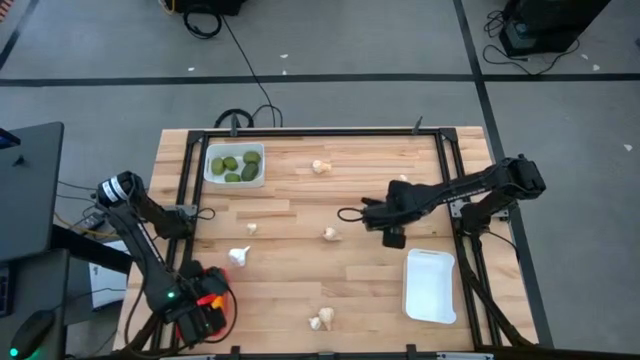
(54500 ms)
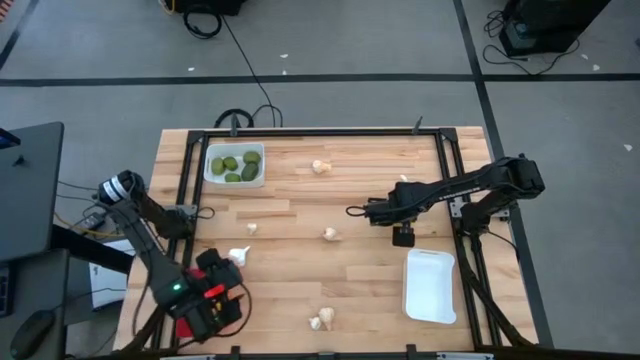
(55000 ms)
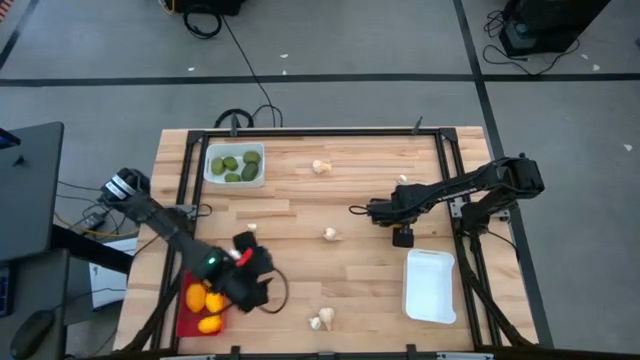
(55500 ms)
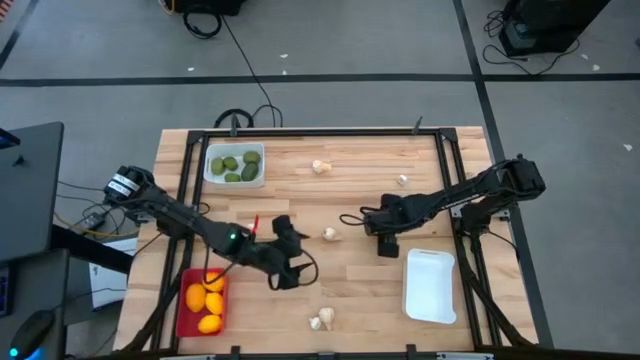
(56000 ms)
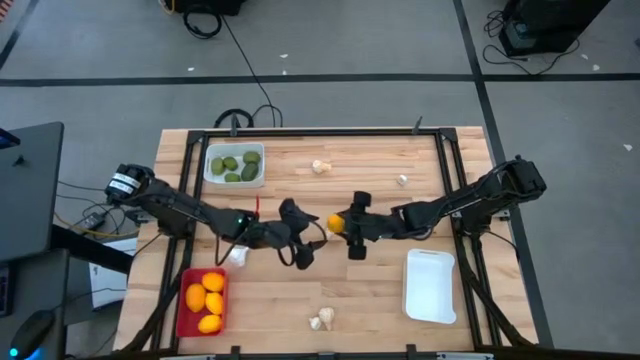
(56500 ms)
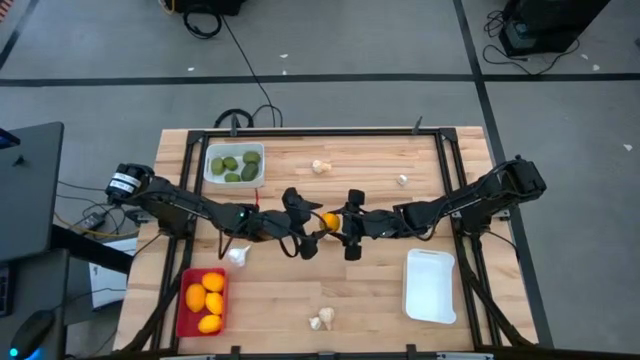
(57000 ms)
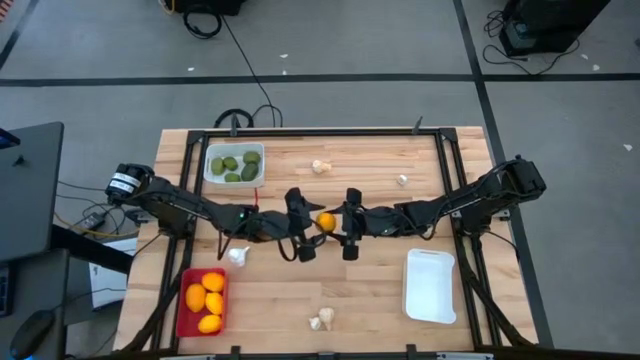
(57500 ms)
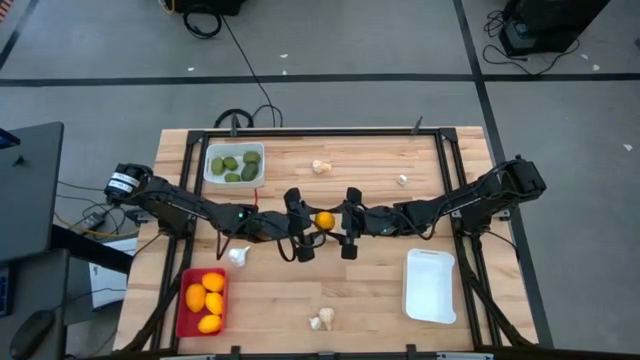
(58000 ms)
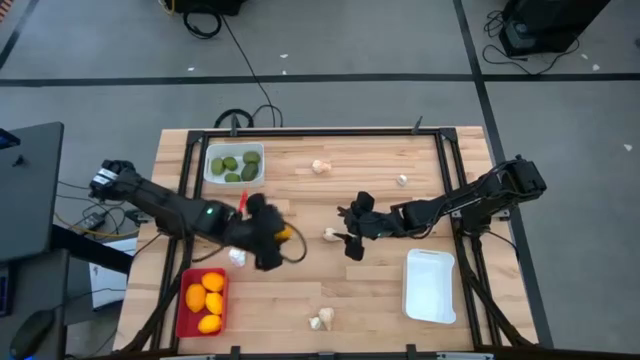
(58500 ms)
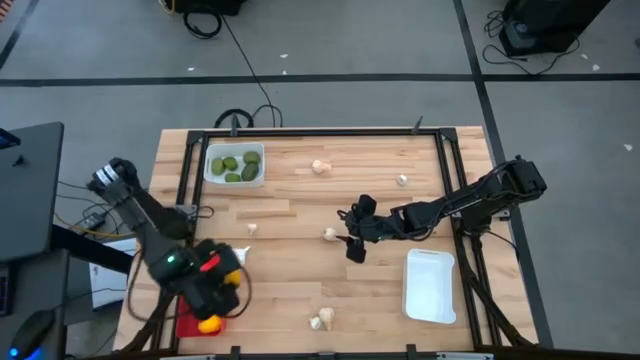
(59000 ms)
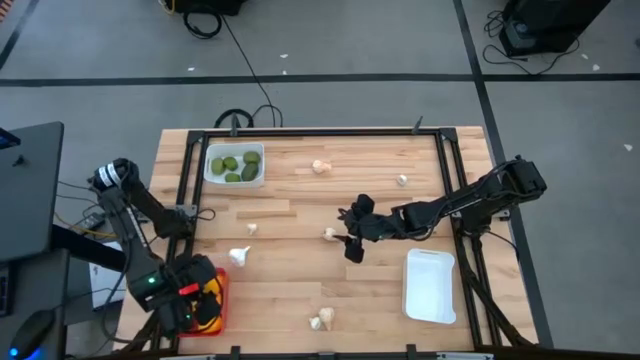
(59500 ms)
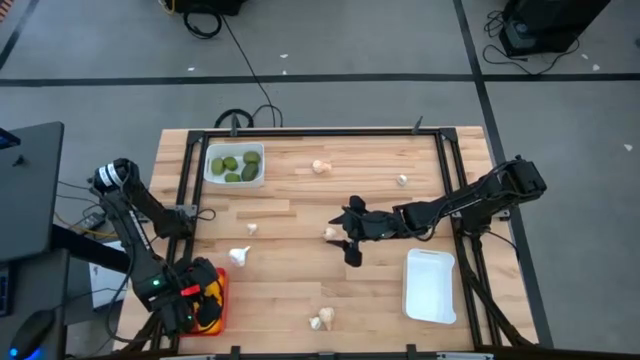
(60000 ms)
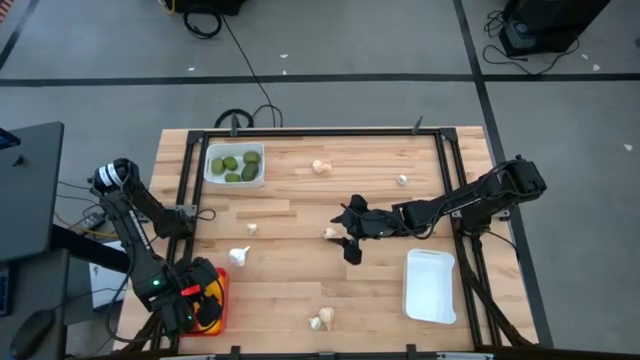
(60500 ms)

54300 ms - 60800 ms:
Task: Sort produce into baskets
Put the yellow lemon into the red bin

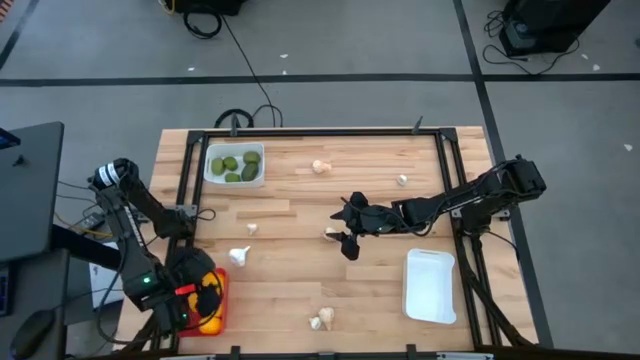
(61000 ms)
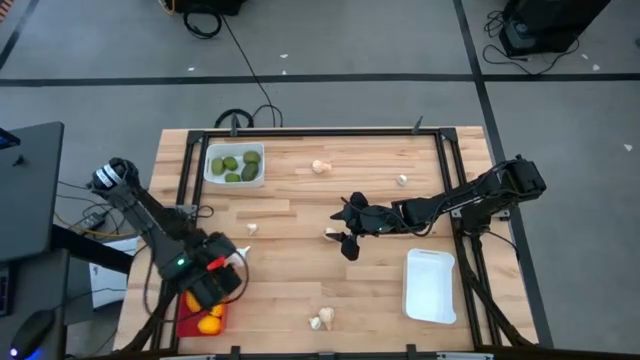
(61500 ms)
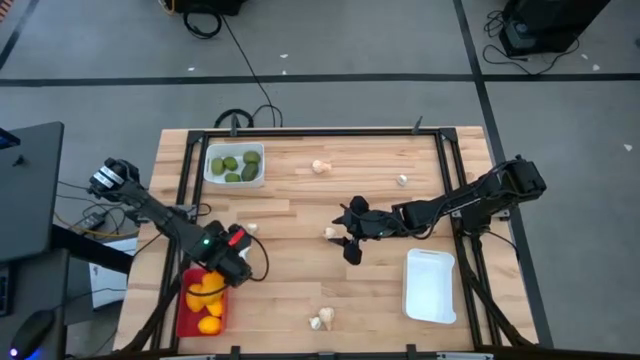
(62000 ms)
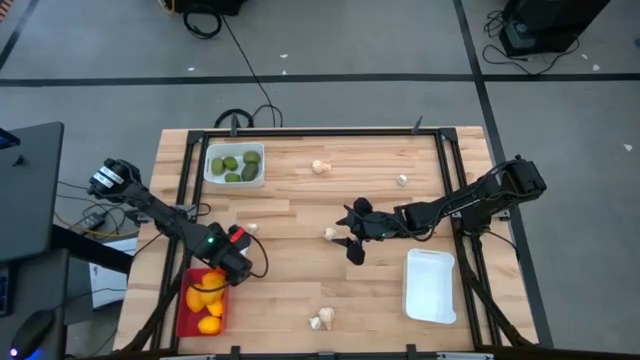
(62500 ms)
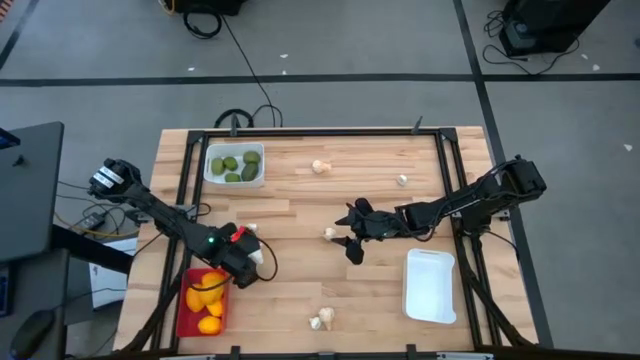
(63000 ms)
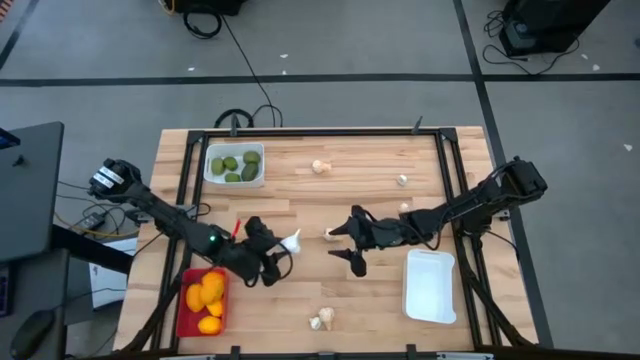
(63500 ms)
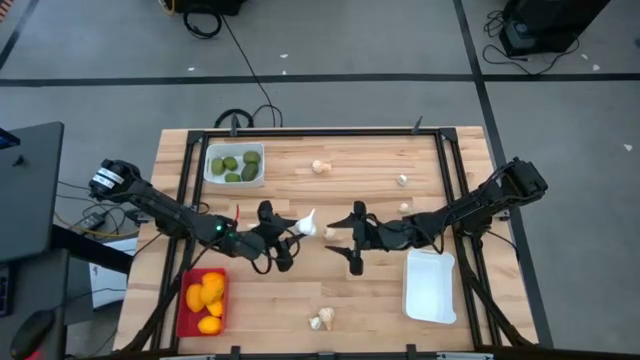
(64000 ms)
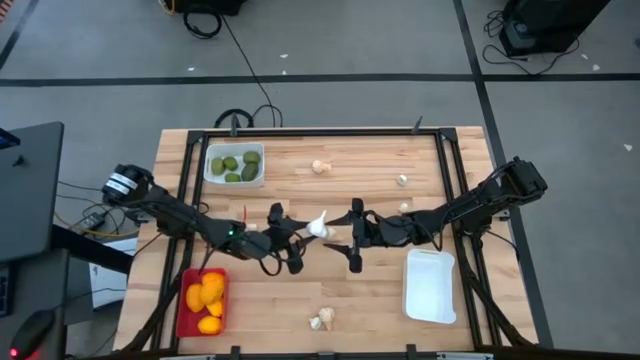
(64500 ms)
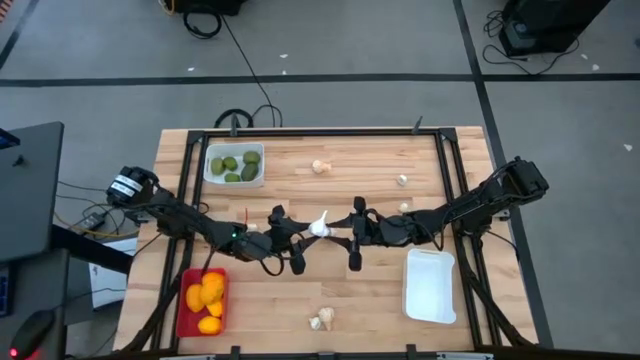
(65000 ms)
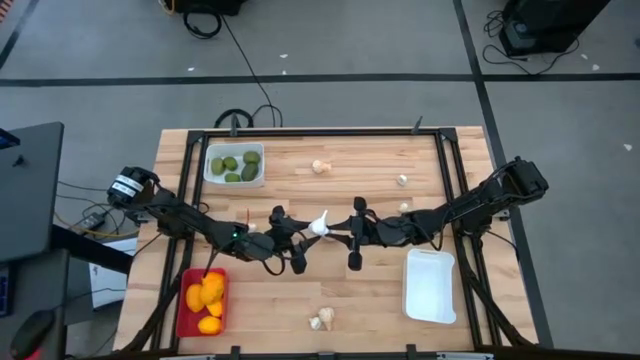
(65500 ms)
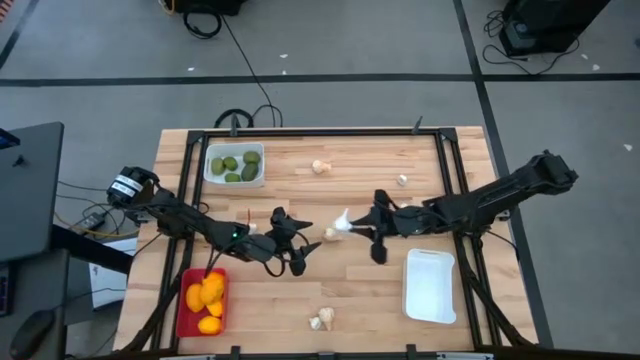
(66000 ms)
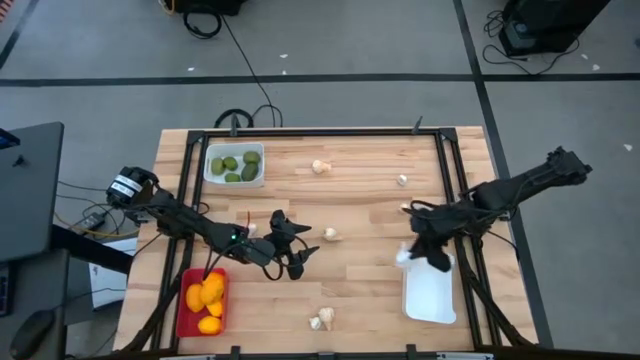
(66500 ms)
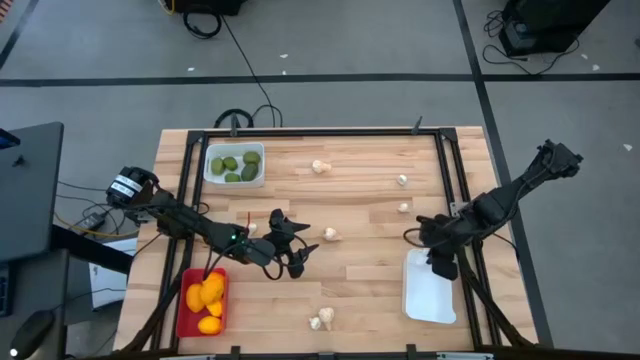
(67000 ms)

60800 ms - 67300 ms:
Put the left big white garlic into the bottom white bin

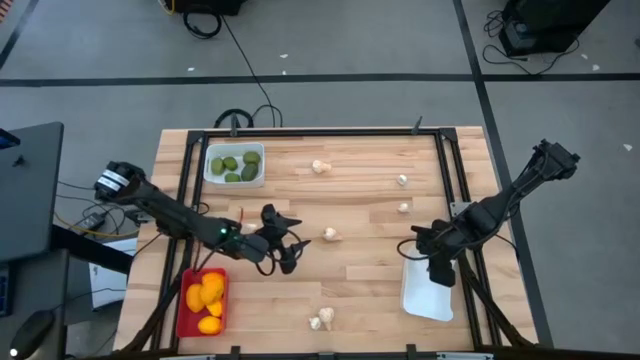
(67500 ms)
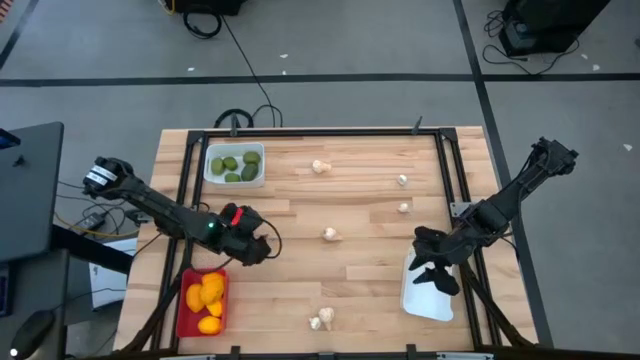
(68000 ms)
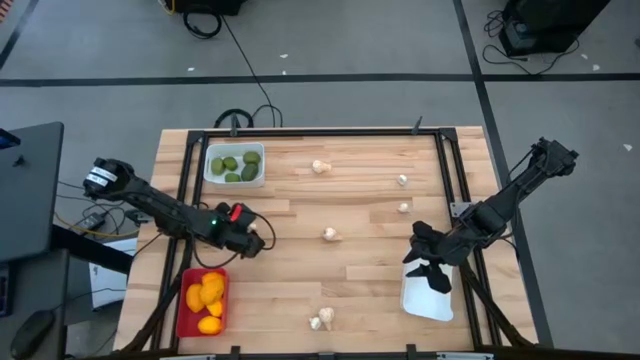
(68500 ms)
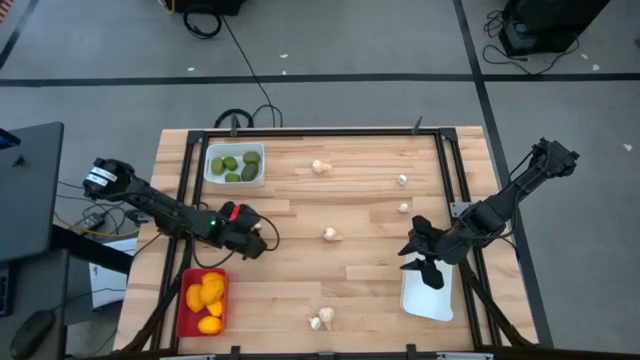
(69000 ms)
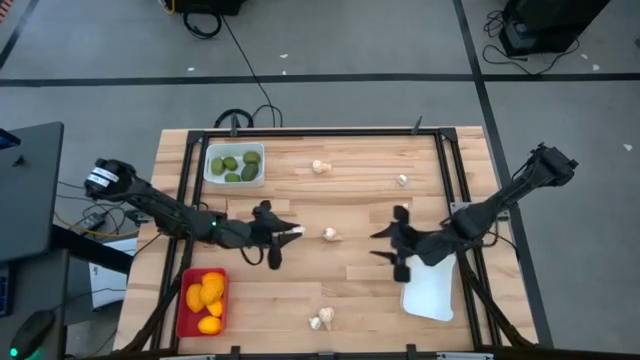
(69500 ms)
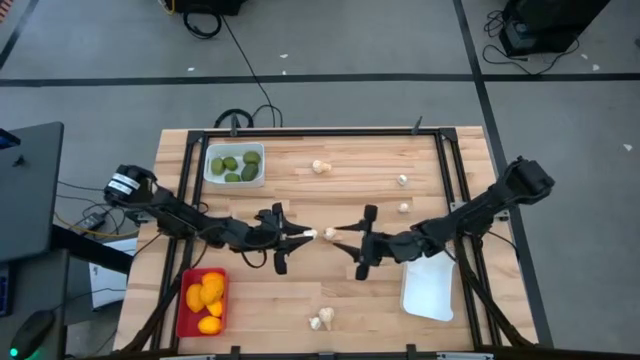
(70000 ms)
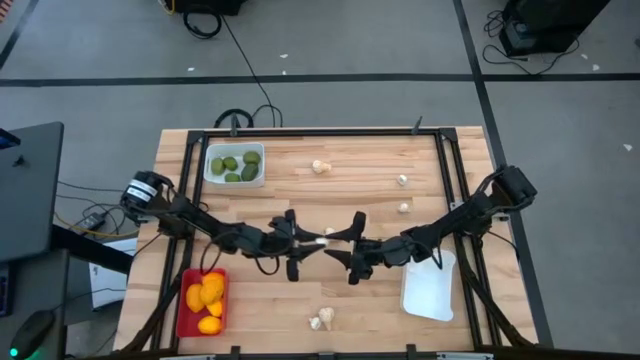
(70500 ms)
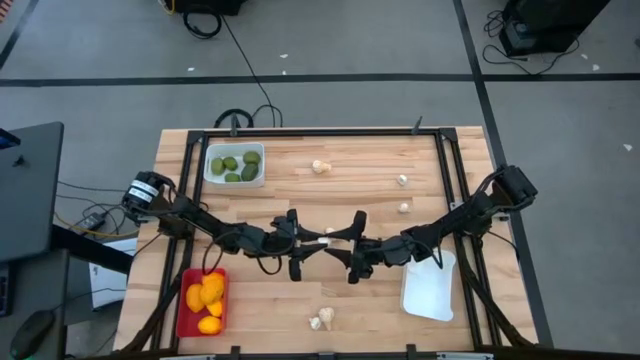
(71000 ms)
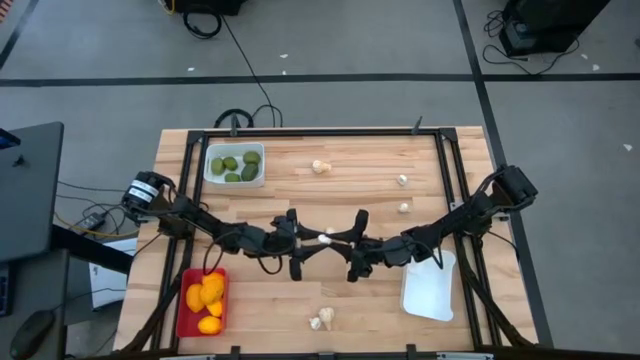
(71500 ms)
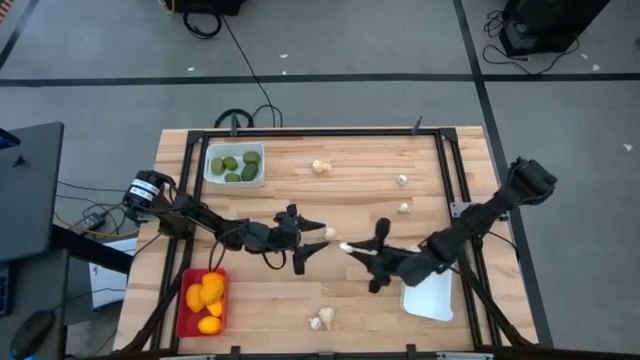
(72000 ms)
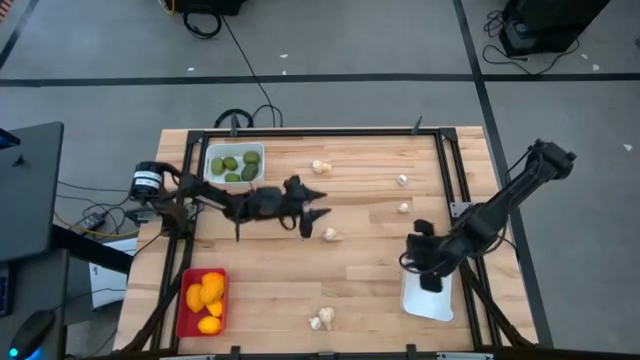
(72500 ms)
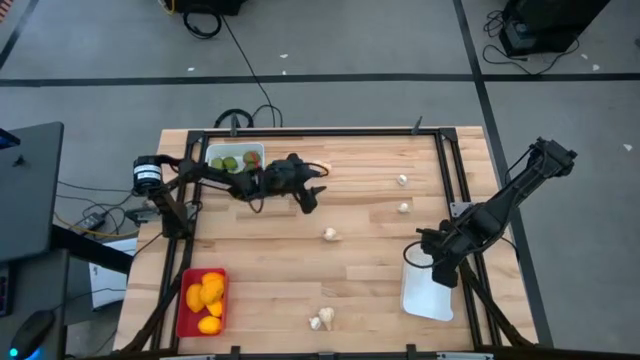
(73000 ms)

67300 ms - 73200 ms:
Put the left small white garlic into the bottom white bin

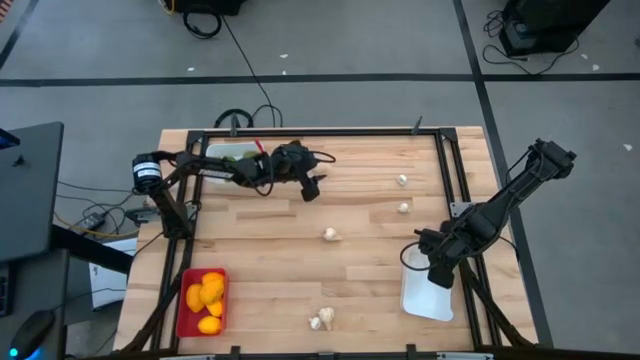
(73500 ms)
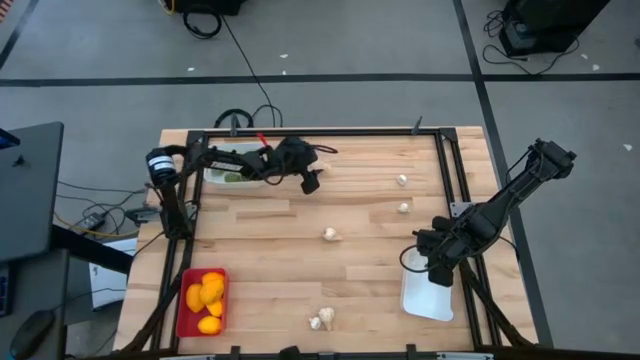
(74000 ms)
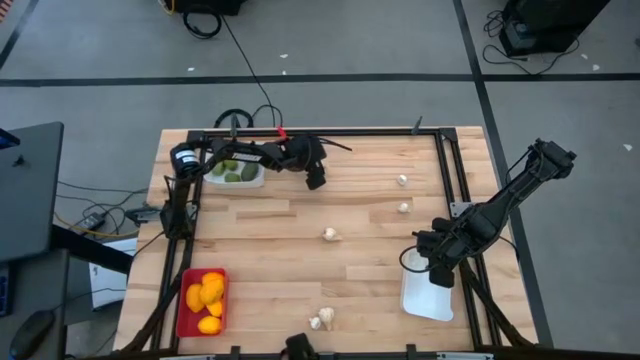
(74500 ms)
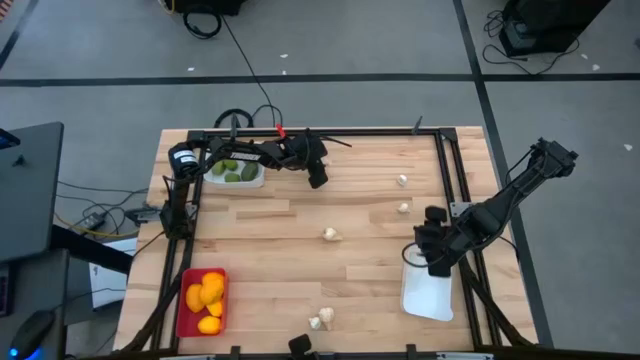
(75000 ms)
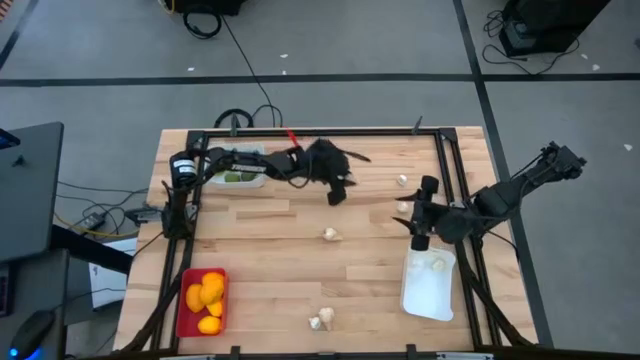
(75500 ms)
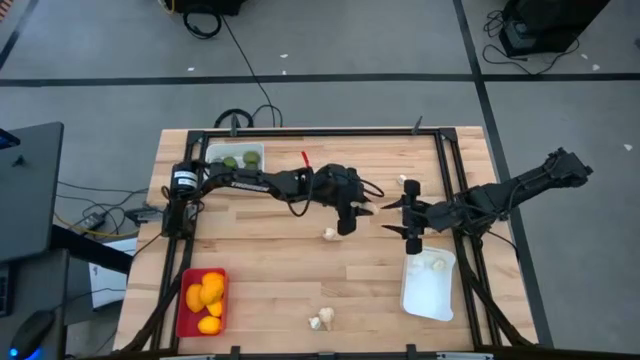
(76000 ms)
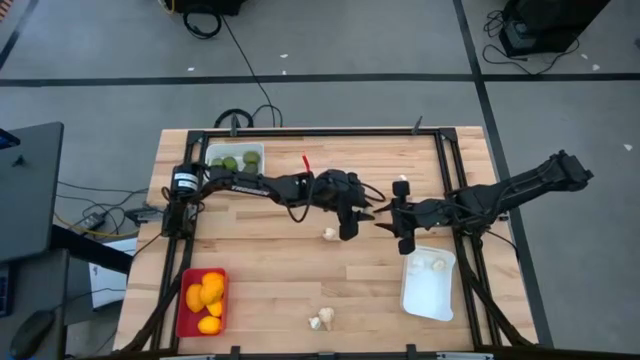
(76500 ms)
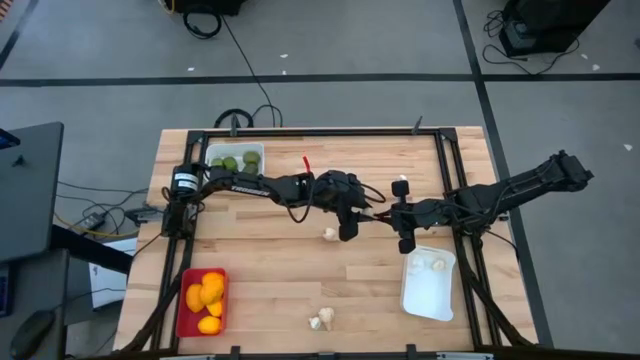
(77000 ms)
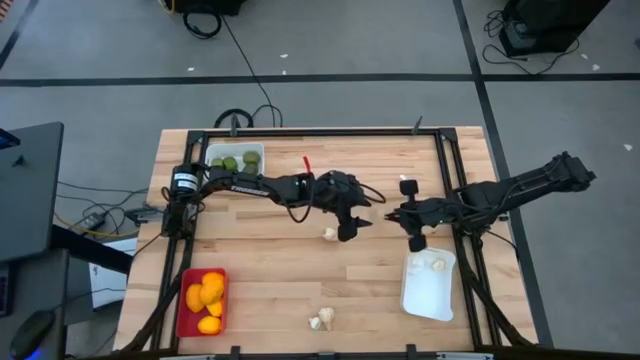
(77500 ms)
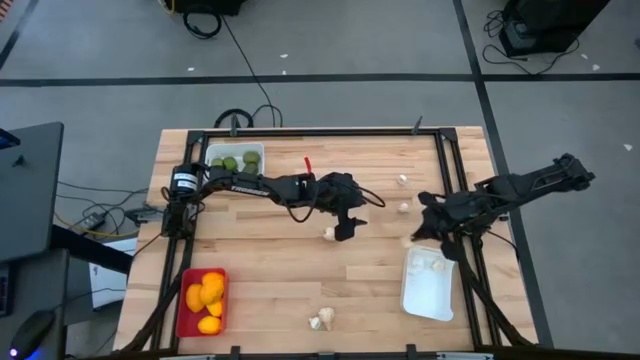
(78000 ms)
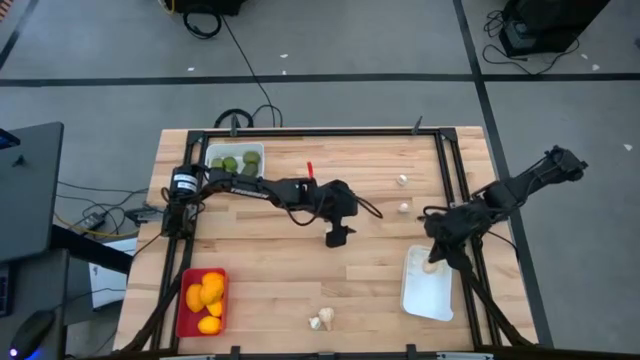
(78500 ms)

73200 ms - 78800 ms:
Put the top big white garlic into the bottom white bin
